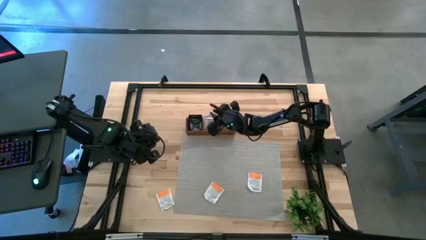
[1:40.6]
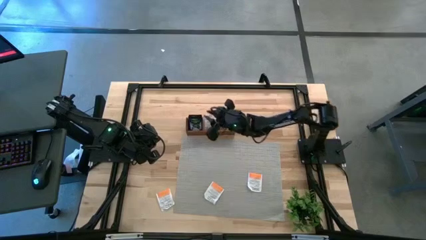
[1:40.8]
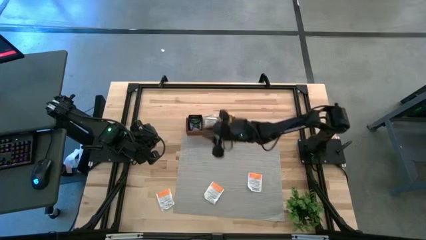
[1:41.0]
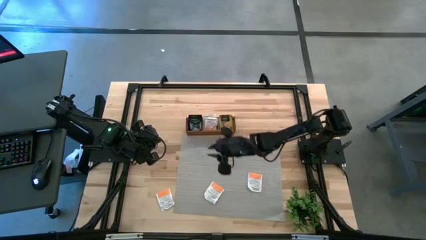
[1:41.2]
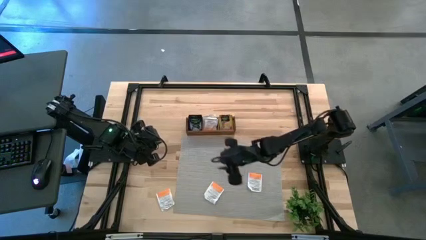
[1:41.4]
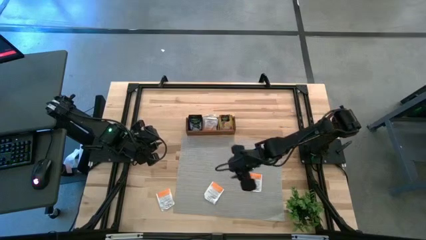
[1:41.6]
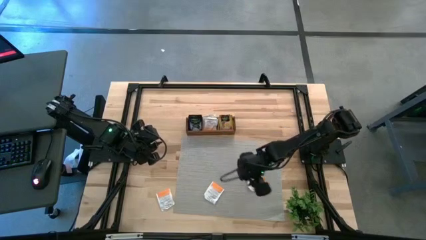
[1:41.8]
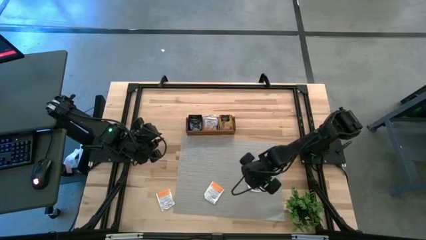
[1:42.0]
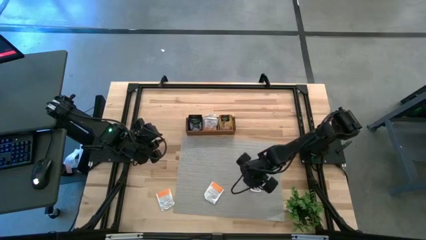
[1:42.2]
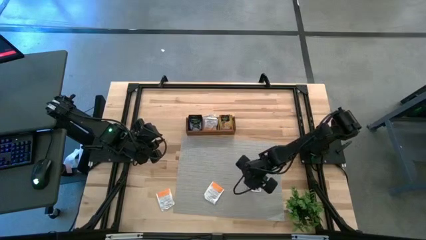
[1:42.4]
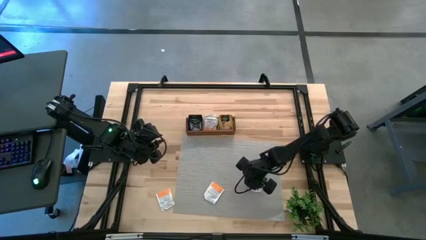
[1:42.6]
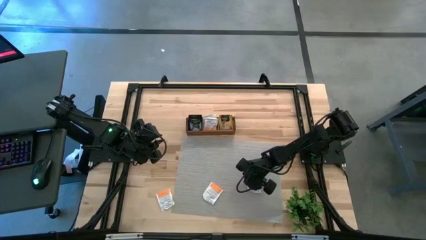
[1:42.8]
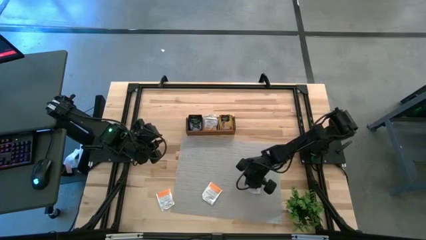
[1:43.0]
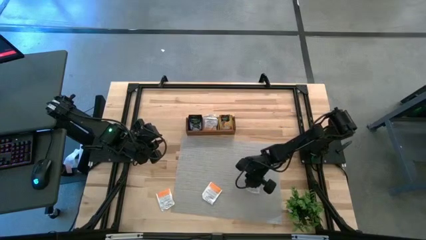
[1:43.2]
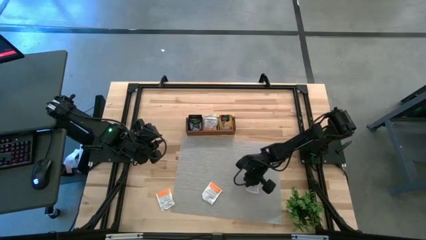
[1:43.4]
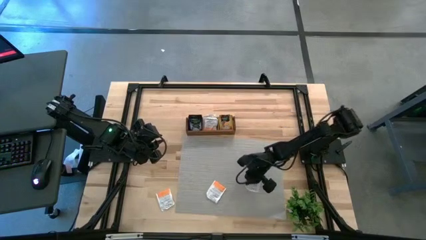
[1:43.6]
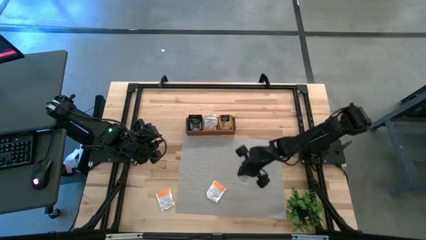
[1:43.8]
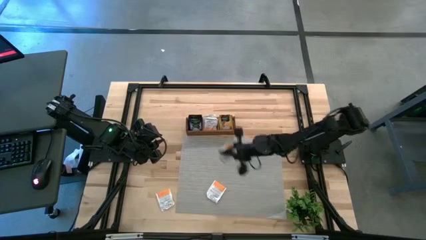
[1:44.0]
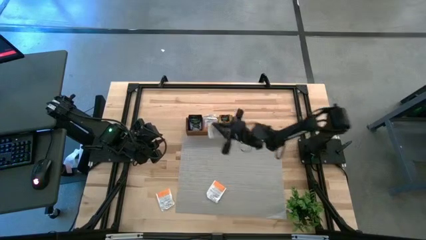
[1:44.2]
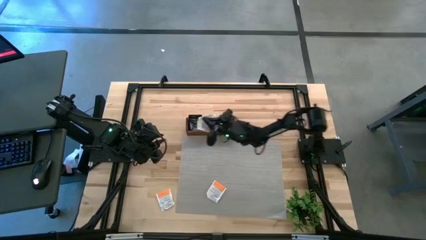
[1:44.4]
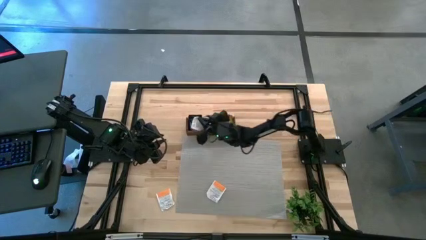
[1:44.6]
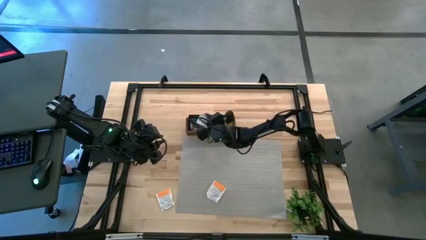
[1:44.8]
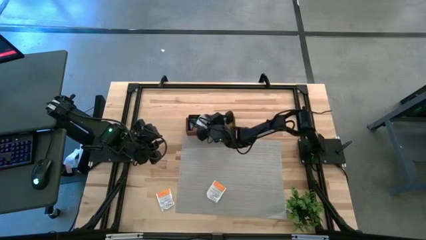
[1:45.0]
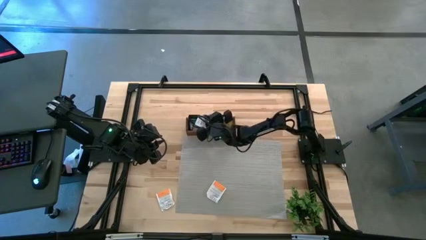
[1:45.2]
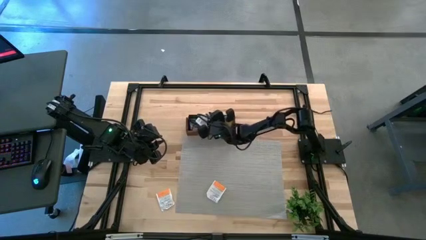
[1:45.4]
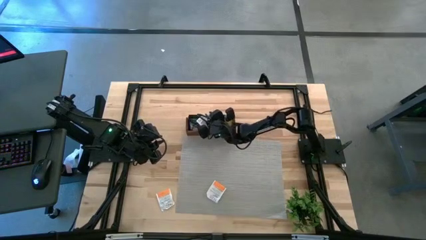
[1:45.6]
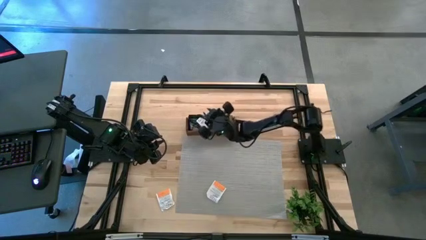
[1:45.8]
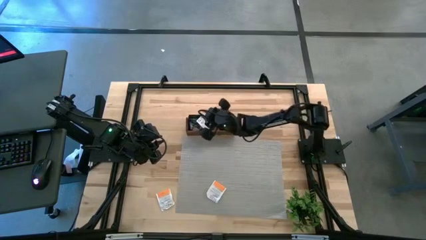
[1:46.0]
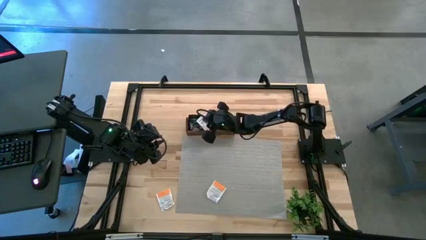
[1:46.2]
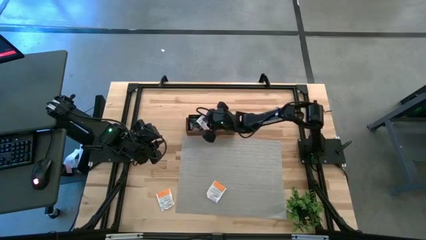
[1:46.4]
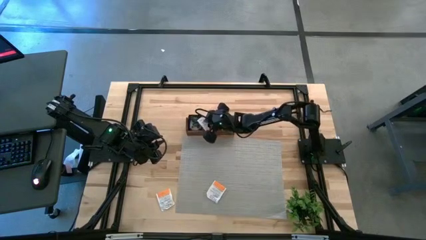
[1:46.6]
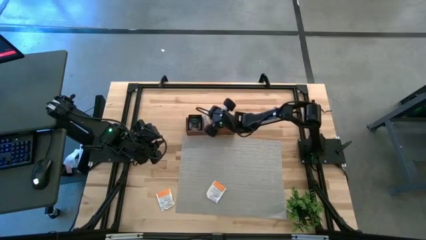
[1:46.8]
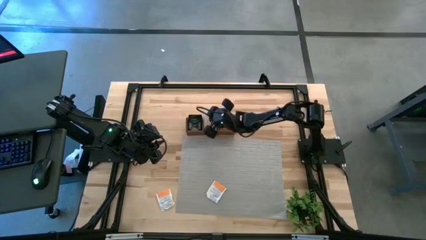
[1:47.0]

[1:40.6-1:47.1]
Task: Pick & Place Tea
Put the white tea bag into the middle section of the wooden organizer

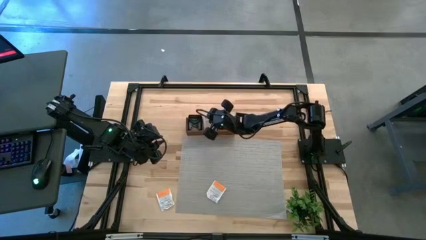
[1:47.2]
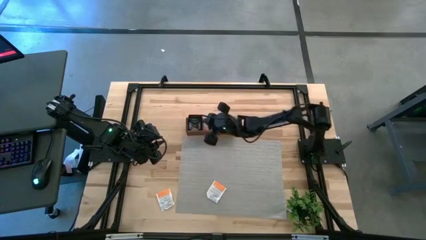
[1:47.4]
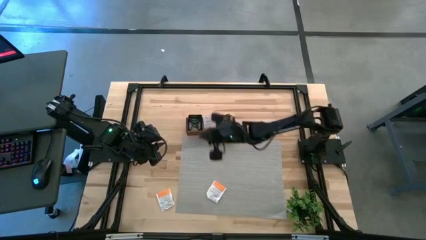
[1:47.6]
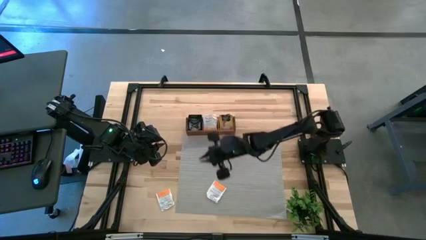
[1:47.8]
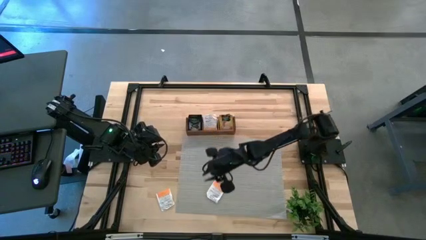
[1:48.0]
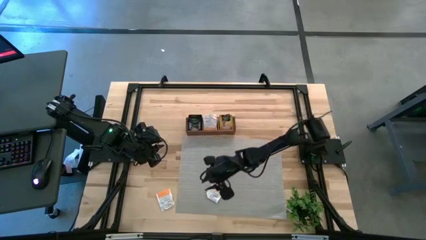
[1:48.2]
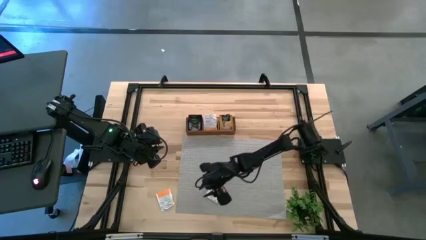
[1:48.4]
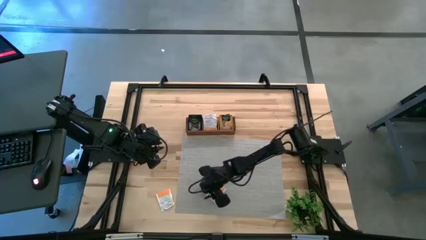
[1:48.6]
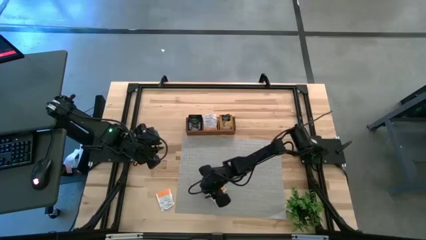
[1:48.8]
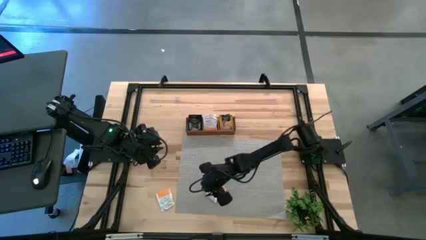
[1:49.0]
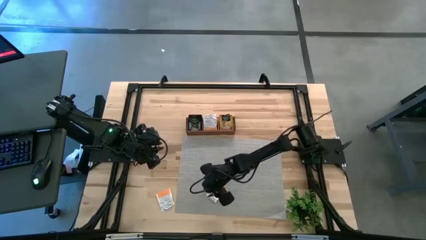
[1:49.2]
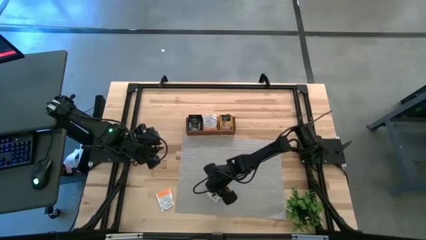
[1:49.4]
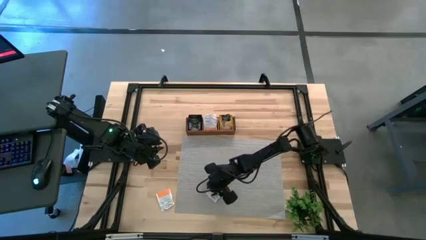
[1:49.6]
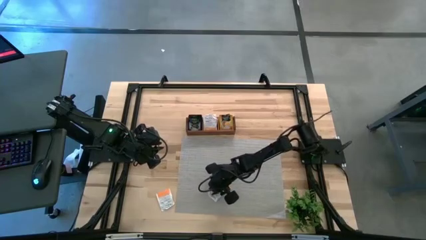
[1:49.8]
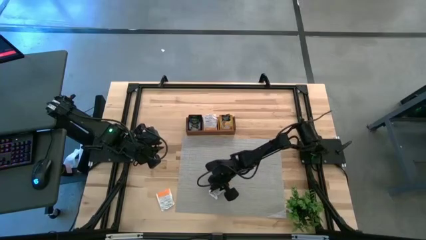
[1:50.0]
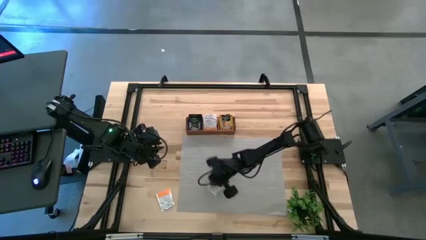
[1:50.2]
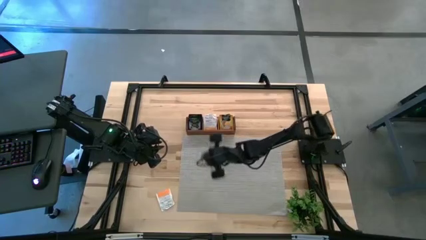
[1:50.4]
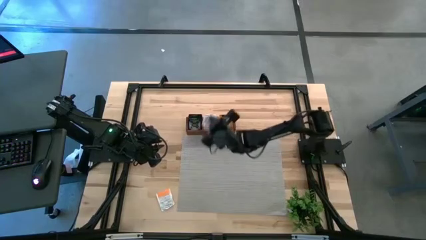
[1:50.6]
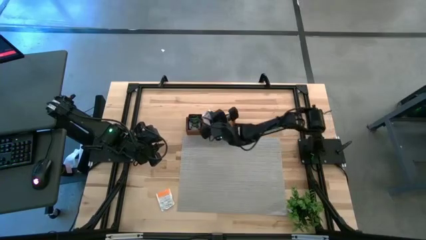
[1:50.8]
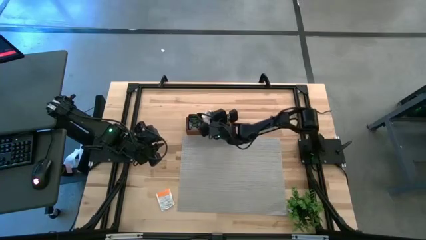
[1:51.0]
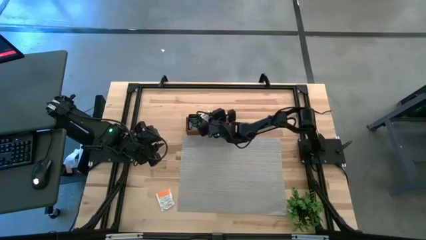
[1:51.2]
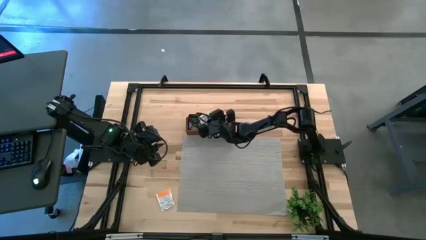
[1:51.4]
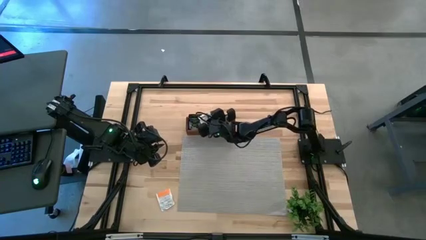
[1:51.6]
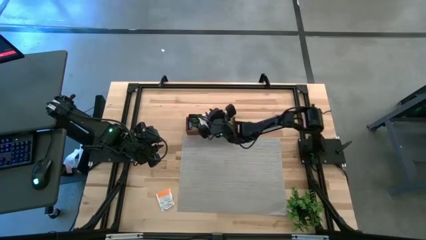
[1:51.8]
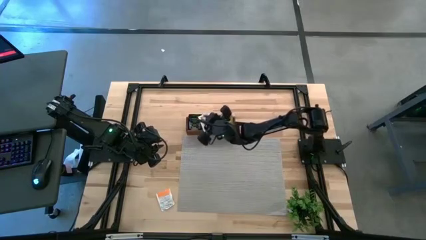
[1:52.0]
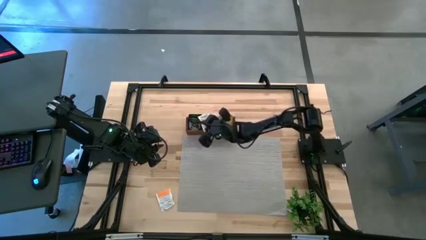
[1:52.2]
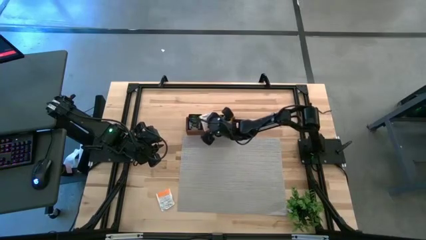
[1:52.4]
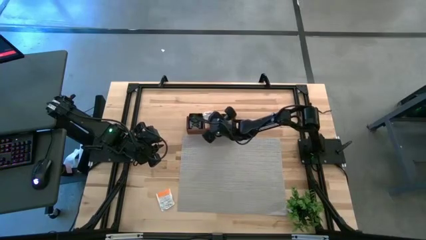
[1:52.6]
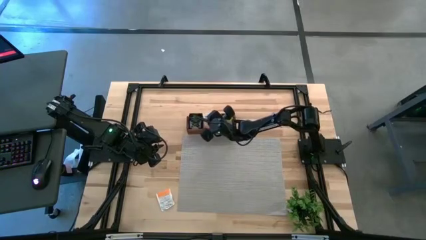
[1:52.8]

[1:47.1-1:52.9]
Put the white tea bag into the middle section of the wooden organizer

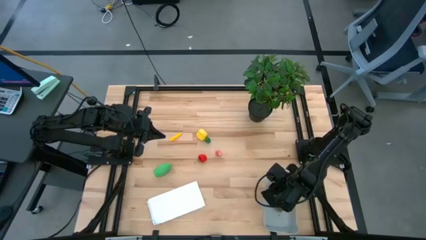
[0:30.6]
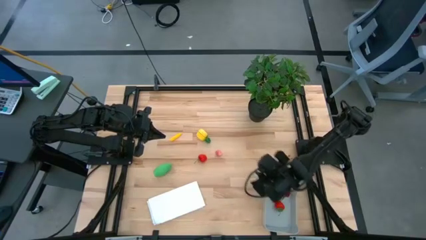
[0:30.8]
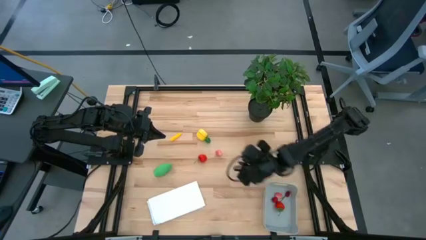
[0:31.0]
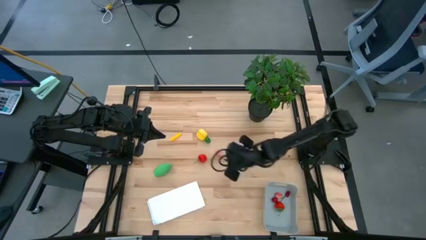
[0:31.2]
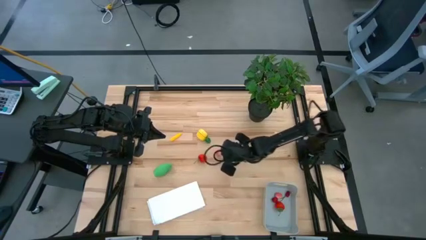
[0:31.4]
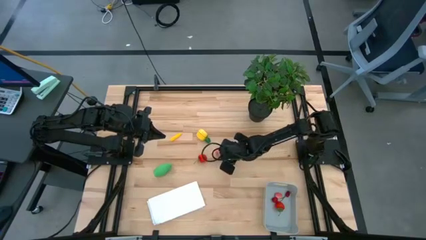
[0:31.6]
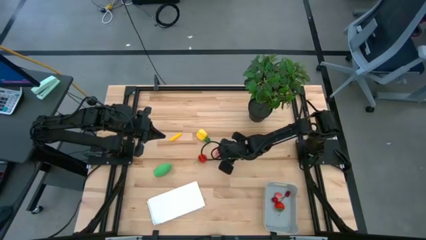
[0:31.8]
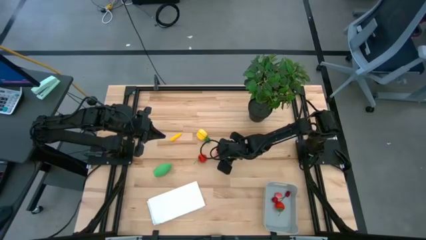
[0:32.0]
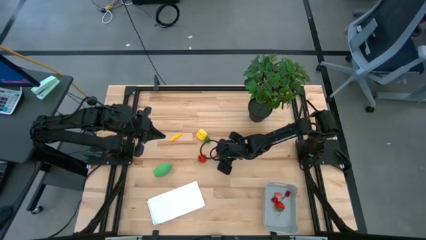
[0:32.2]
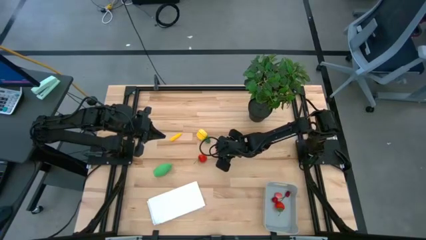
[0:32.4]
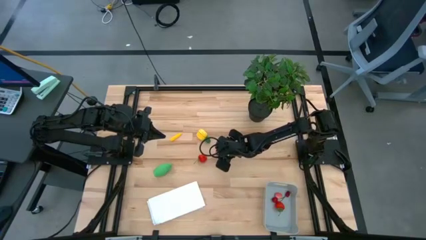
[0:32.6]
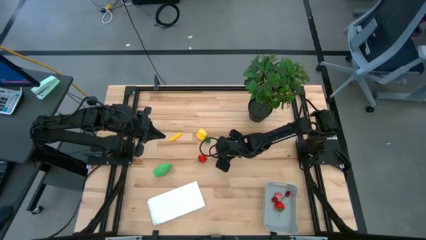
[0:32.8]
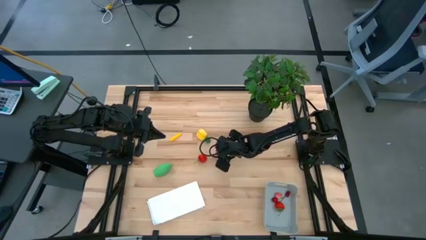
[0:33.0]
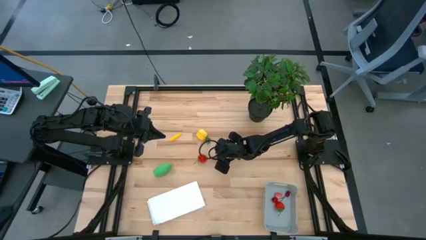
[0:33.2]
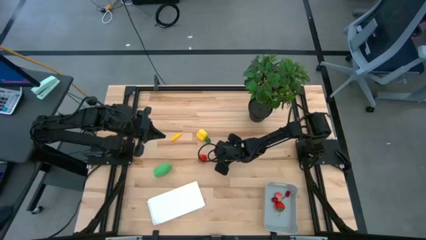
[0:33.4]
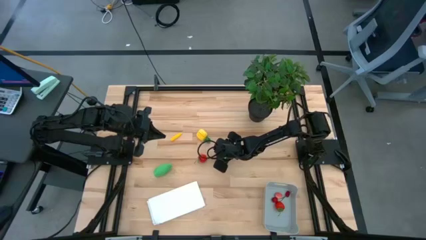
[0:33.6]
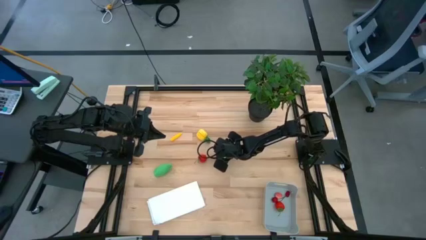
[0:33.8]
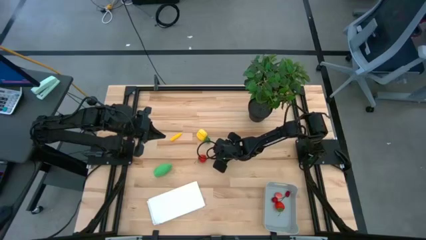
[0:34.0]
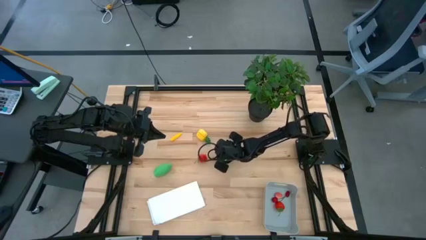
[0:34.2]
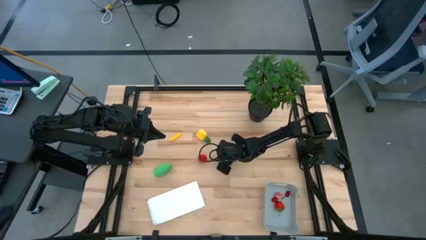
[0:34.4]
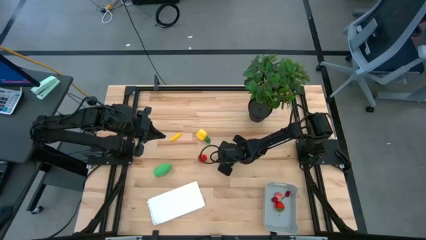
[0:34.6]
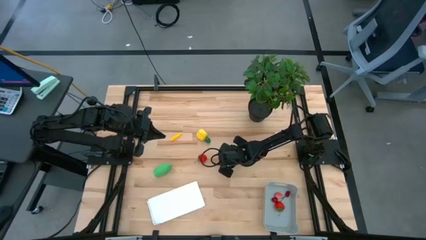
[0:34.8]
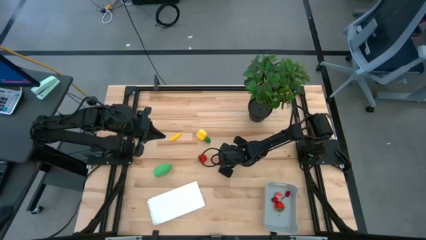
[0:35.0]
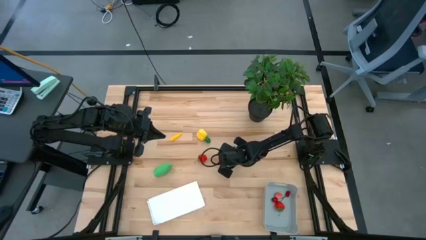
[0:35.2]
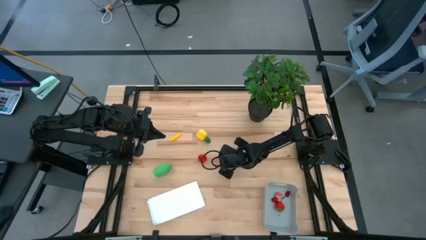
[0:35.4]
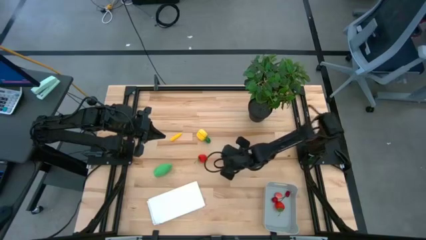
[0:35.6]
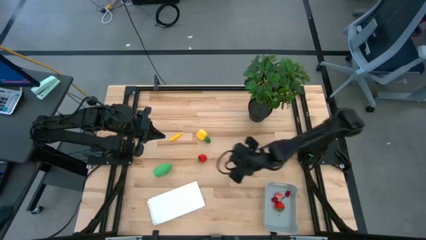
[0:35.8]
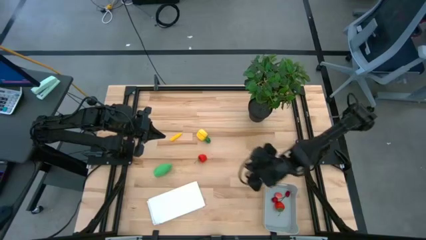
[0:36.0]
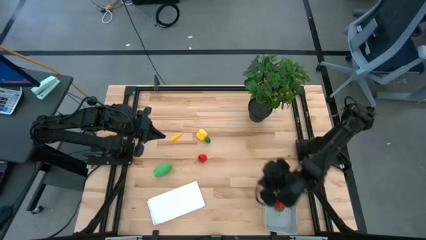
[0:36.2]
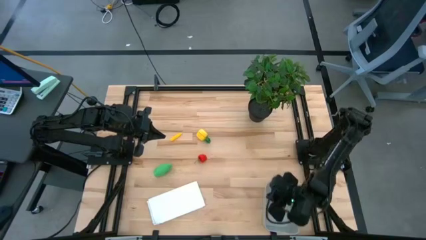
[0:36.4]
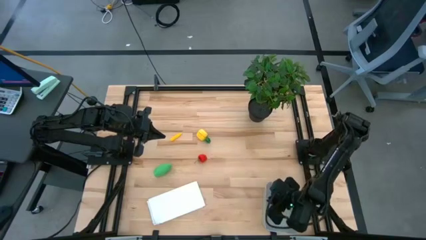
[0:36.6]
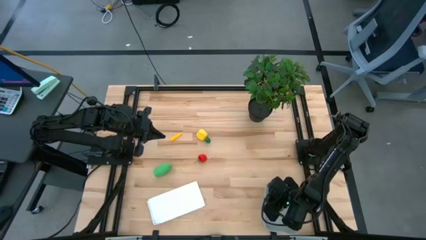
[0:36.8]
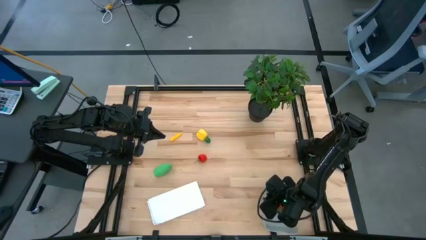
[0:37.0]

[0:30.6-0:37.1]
Task: Pick and placing Produce into tupperware
Put the pink peach into the gray bin
